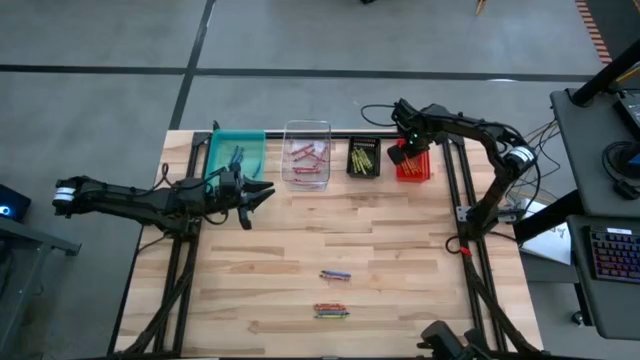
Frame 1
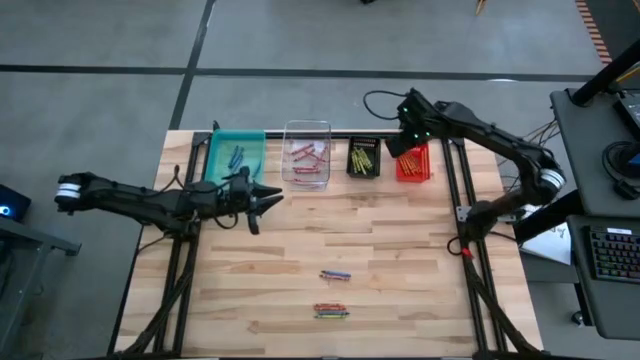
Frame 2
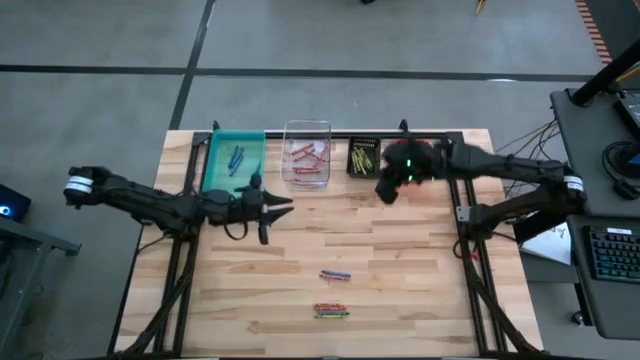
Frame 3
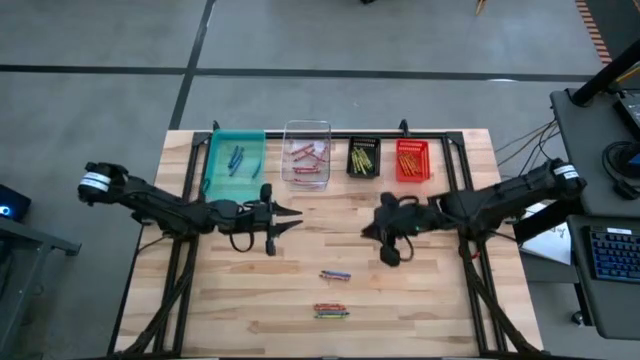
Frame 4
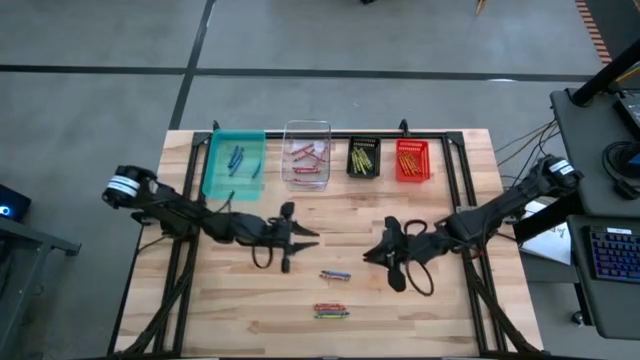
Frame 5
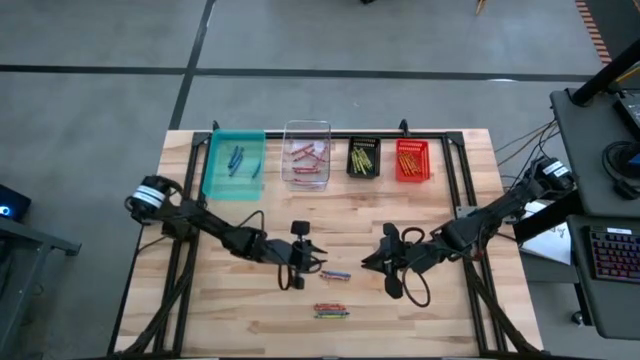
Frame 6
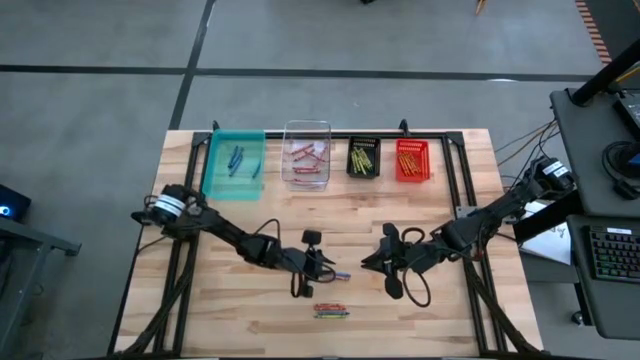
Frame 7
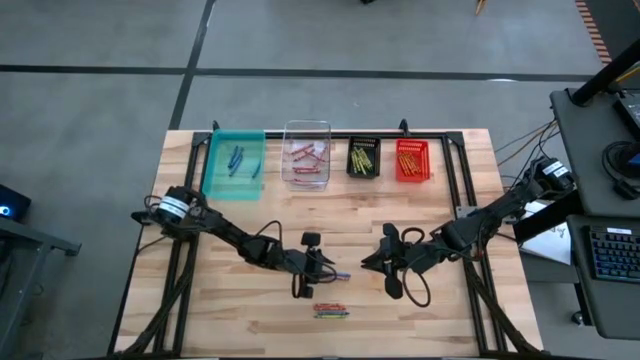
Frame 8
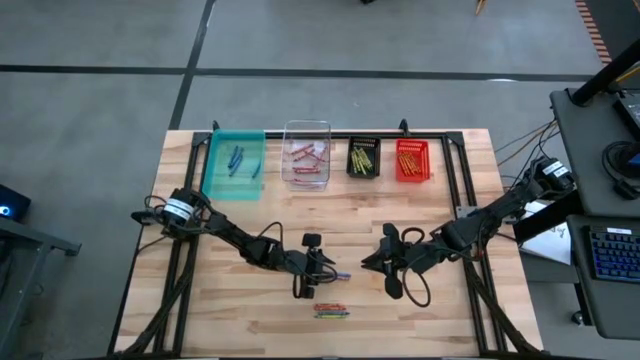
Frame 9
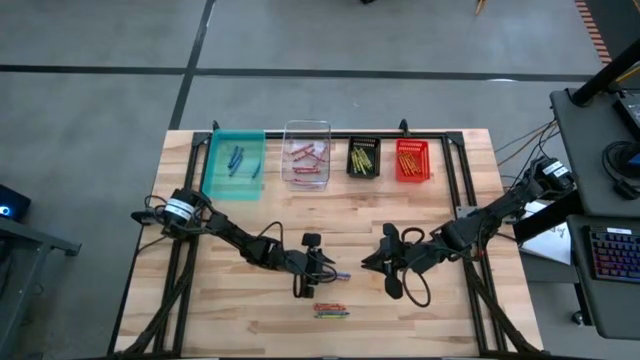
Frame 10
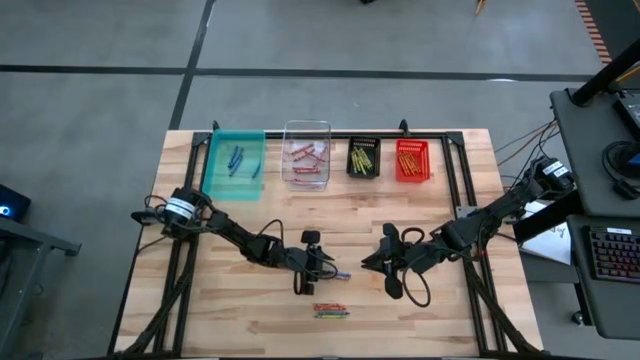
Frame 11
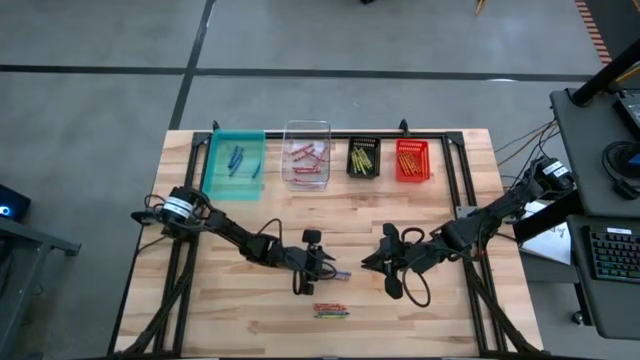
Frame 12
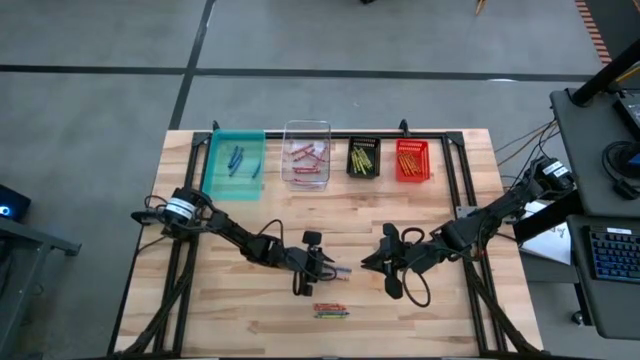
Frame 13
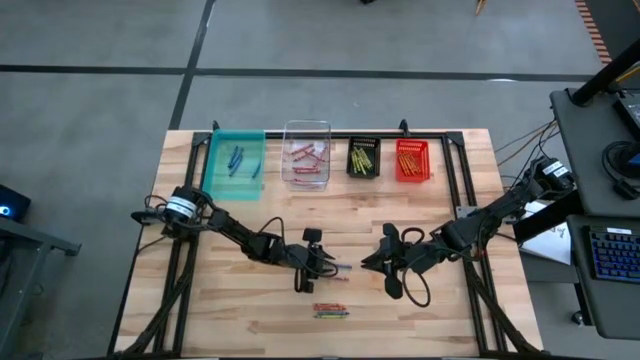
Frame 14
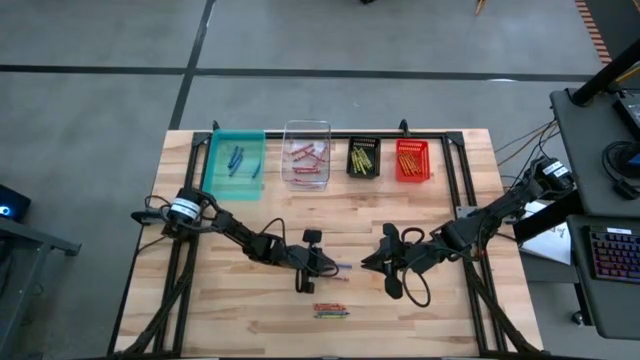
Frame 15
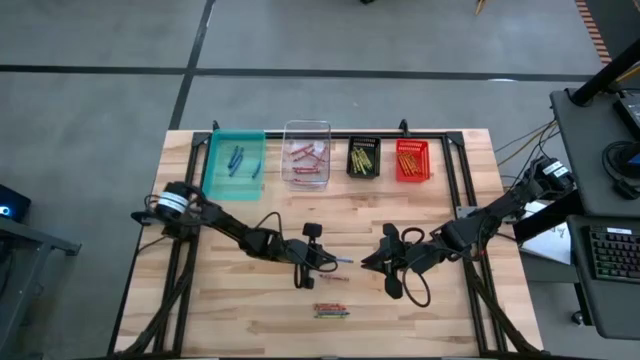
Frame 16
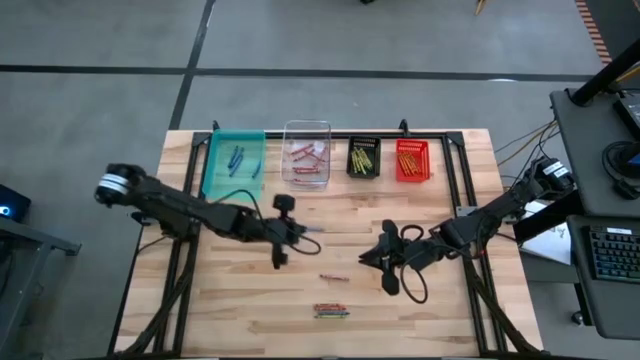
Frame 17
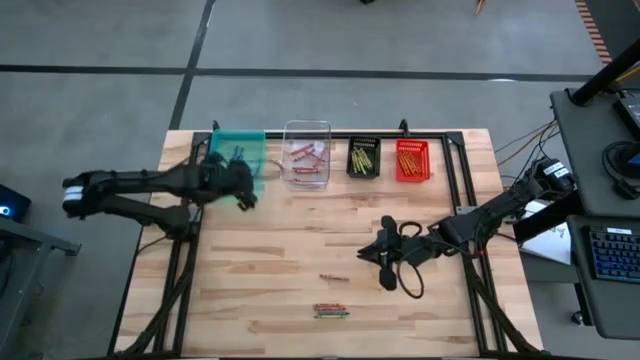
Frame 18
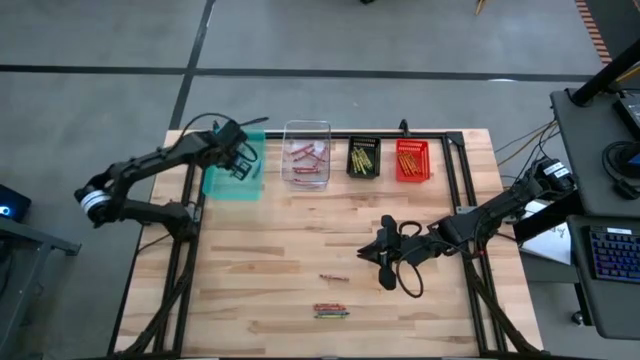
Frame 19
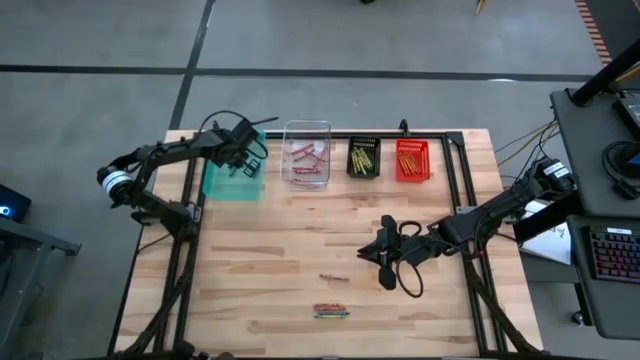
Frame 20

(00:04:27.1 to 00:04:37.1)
Task: Sort crayons
Put the blue crayon into the green transparent bin

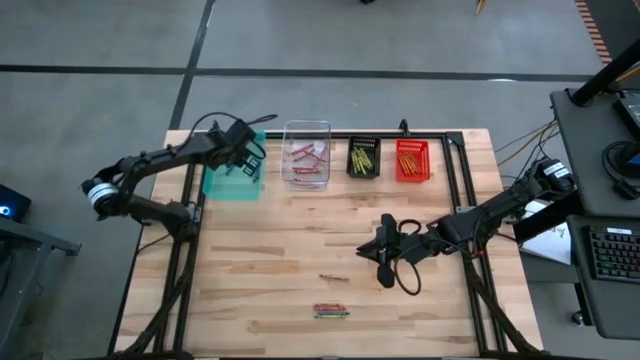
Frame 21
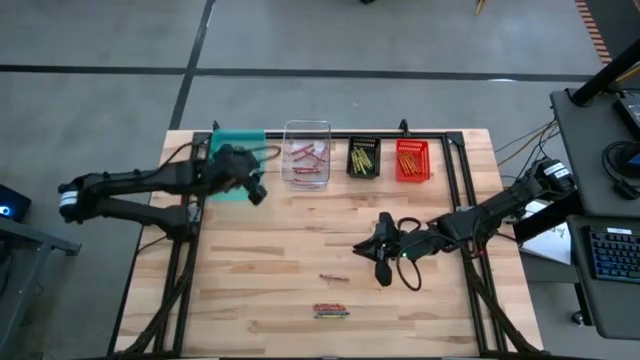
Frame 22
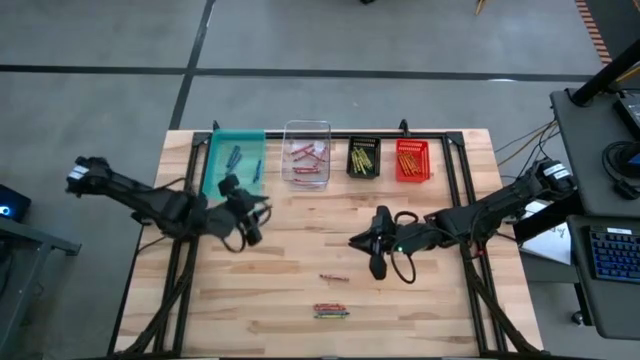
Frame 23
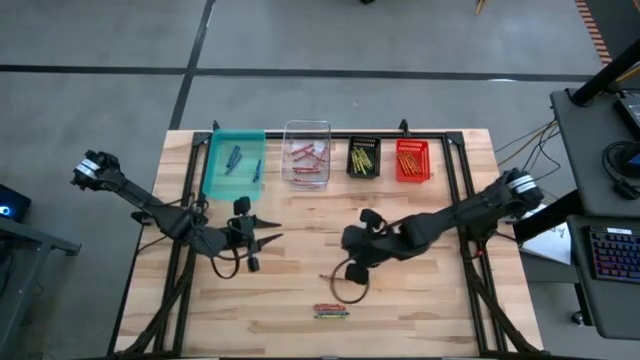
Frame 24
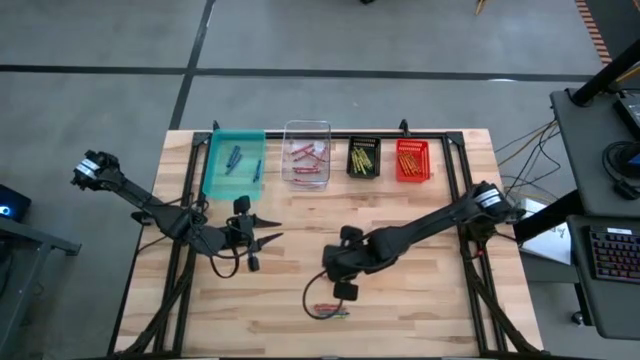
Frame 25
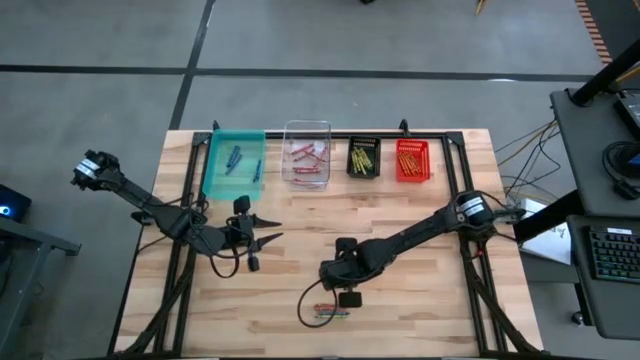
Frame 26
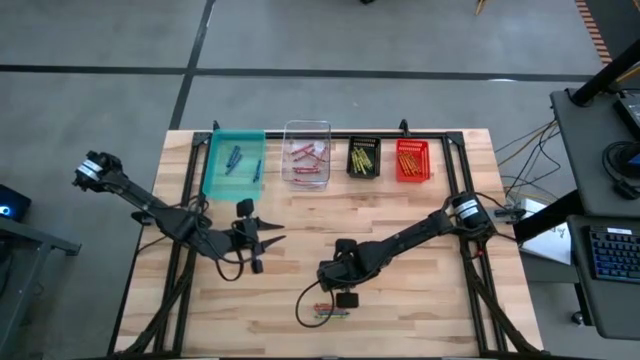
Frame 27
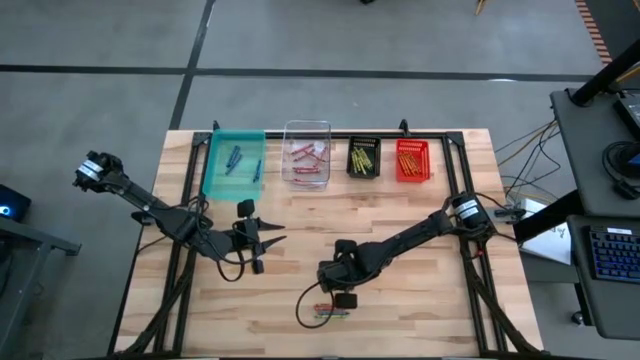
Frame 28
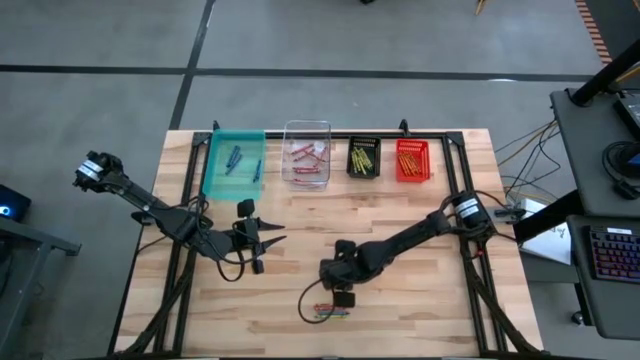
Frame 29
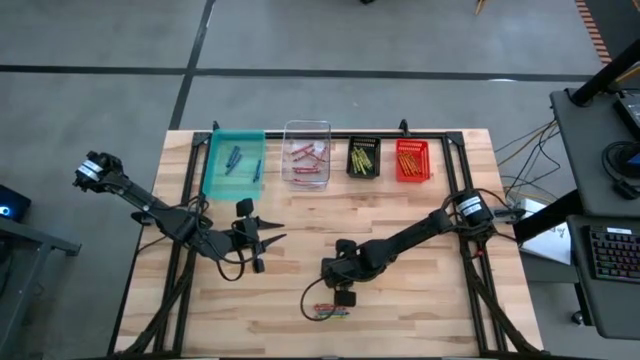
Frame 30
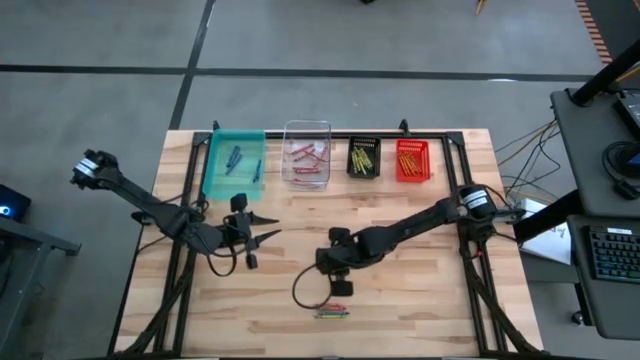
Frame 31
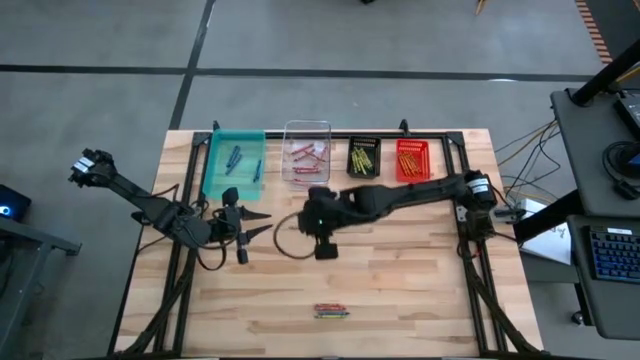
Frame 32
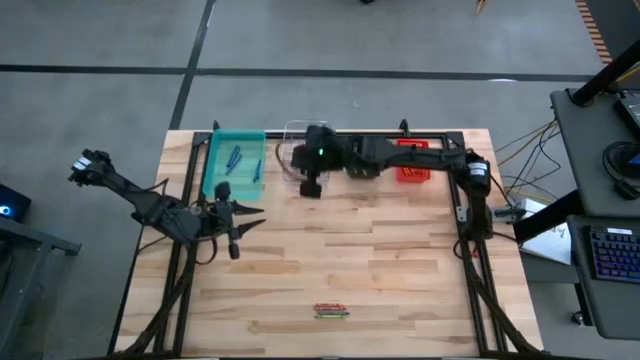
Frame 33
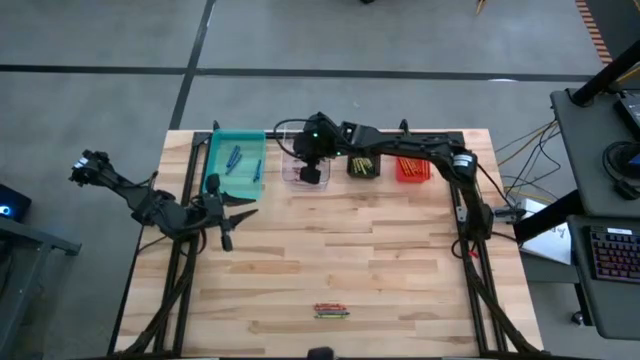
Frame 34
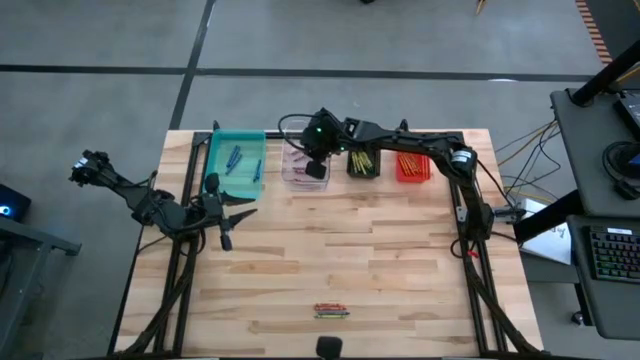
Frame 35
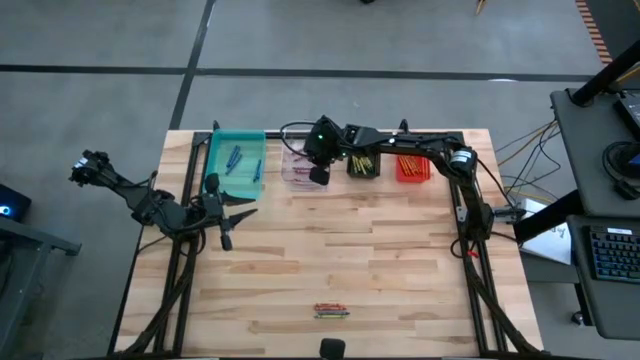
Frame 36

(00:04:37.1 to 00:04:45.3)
Put the red crayon into the transparent bin

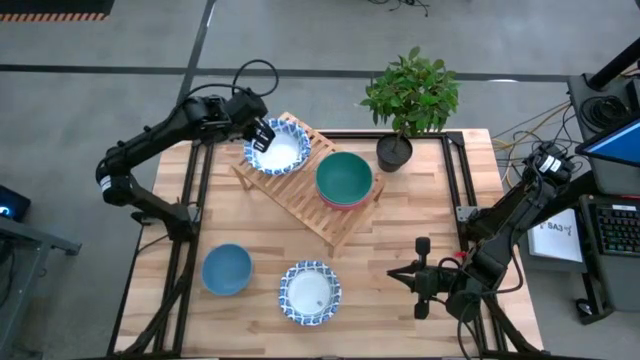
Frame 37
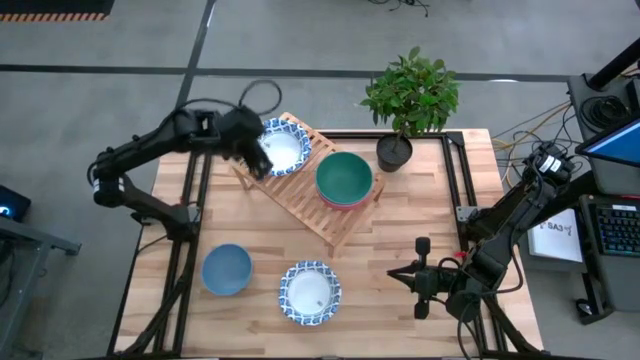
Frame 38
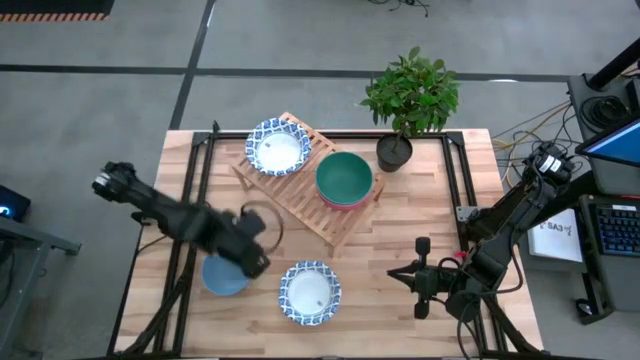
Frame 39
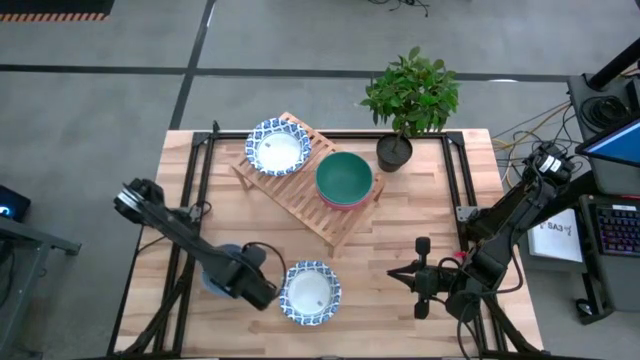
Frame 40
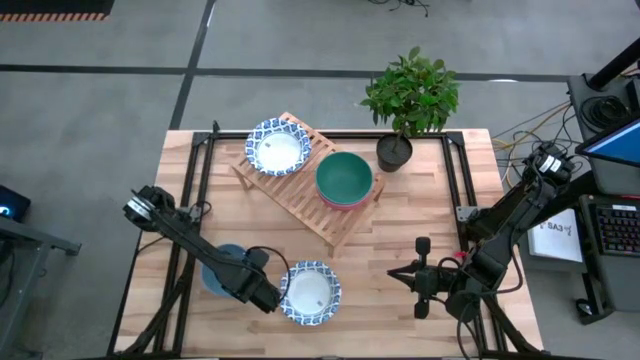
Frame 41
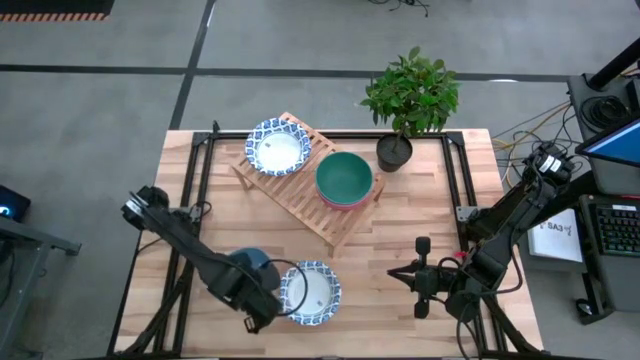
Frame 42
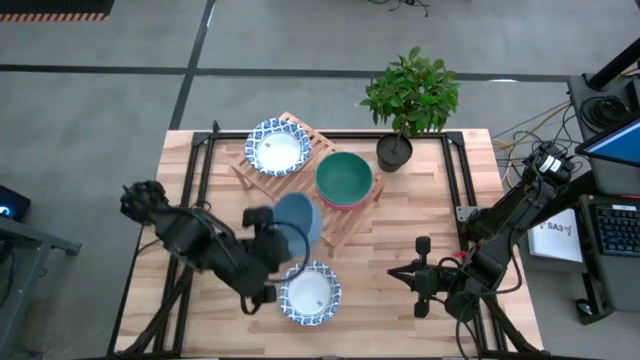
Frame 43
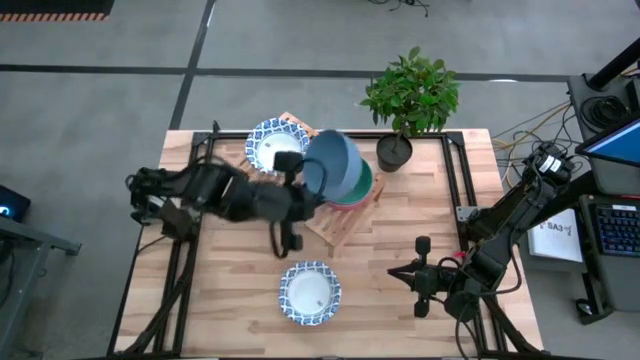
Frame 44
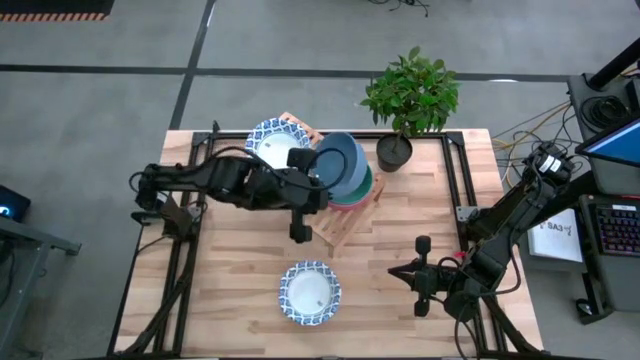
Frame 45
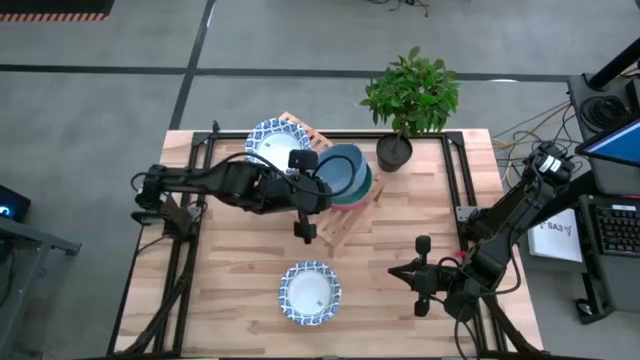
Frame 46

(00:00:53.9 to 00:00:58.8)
Task: Place and stack bowls onto a shelf
Stack the blue bowl on top of the green bowl on the shelf
